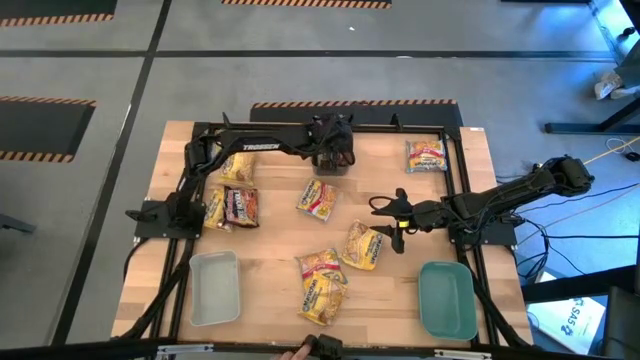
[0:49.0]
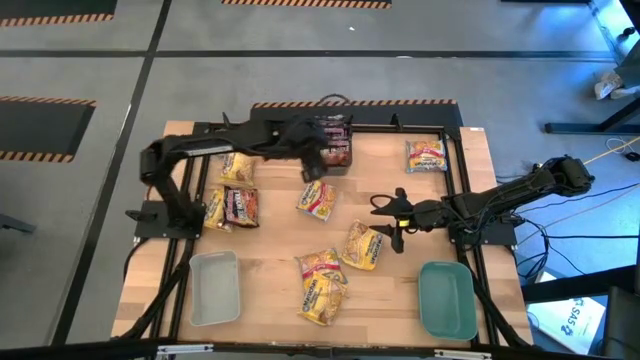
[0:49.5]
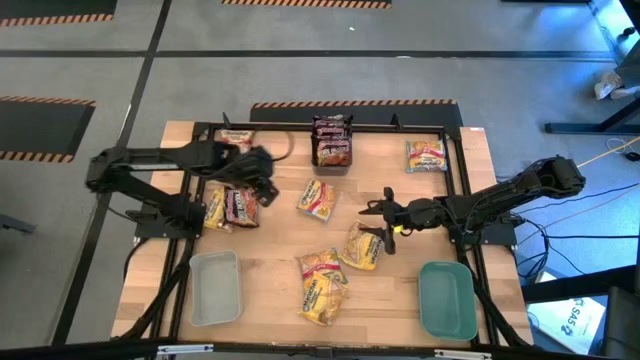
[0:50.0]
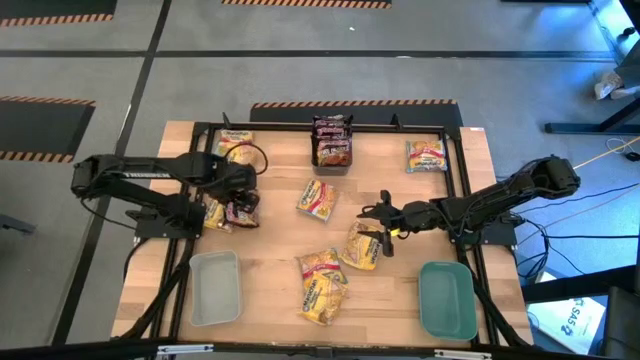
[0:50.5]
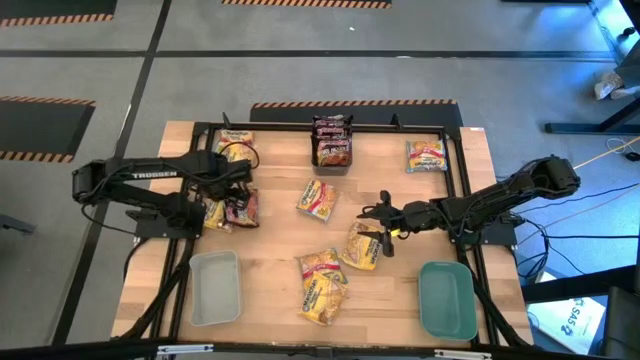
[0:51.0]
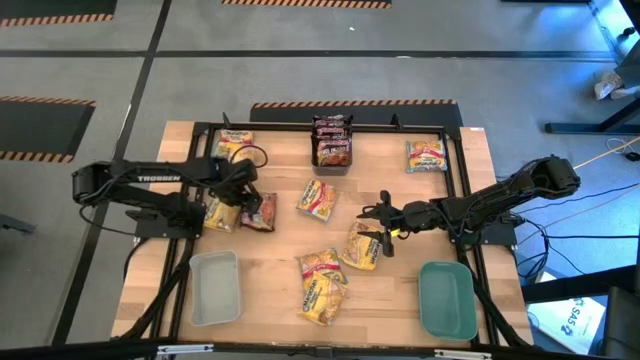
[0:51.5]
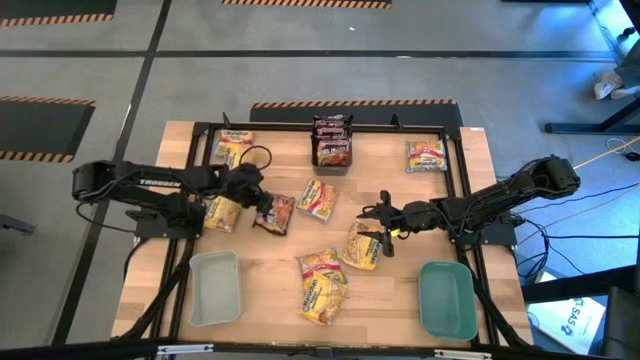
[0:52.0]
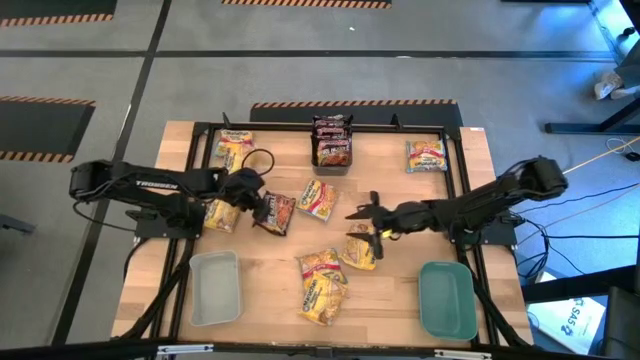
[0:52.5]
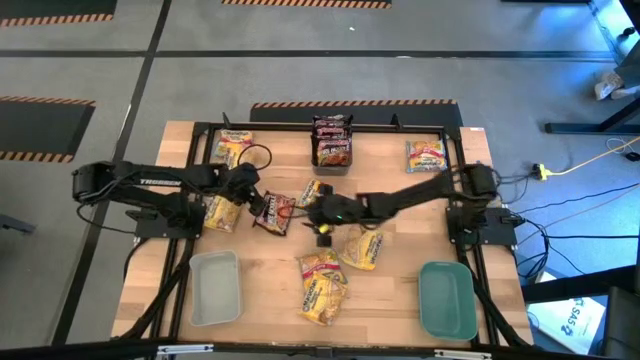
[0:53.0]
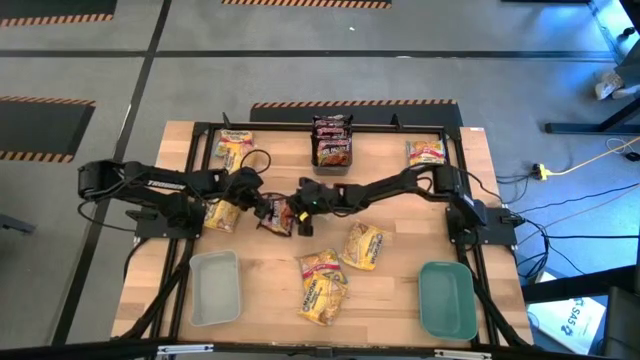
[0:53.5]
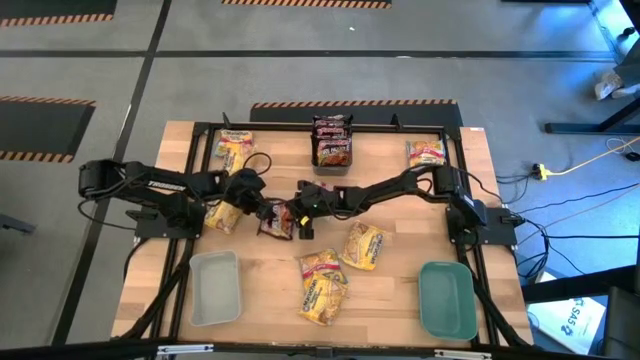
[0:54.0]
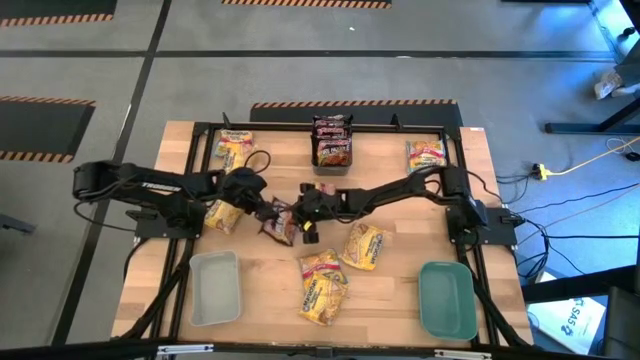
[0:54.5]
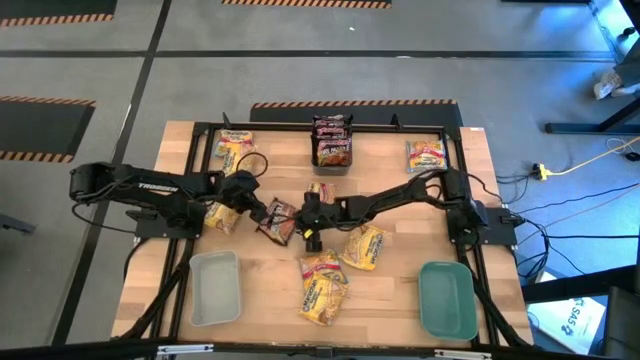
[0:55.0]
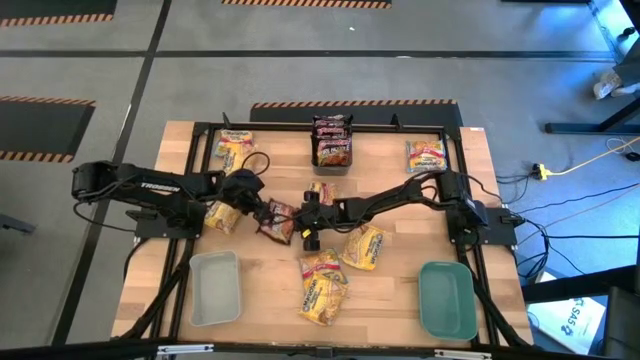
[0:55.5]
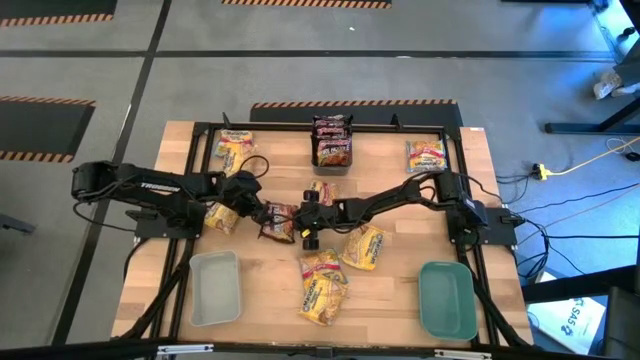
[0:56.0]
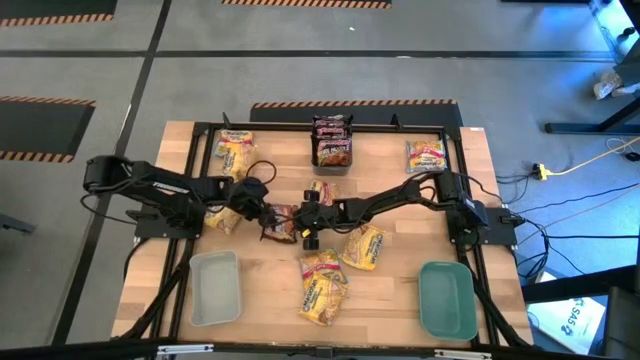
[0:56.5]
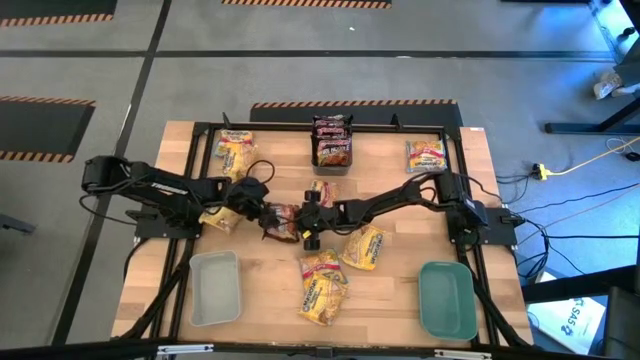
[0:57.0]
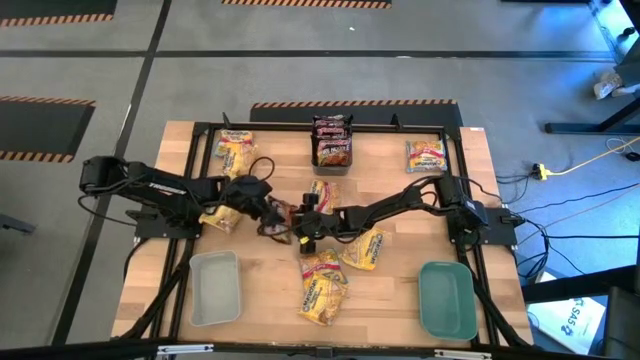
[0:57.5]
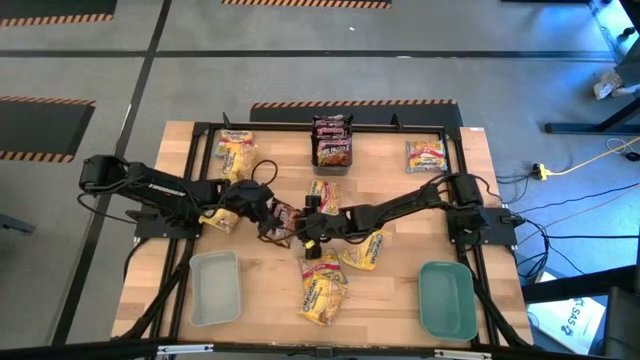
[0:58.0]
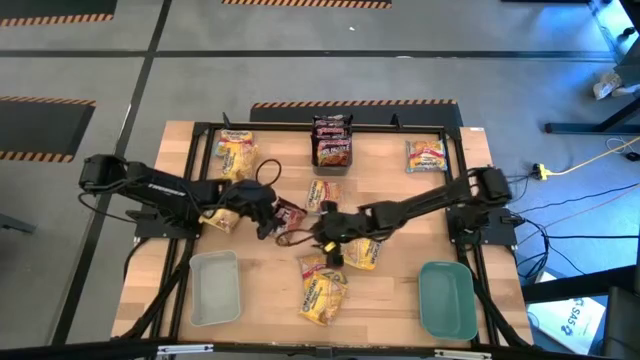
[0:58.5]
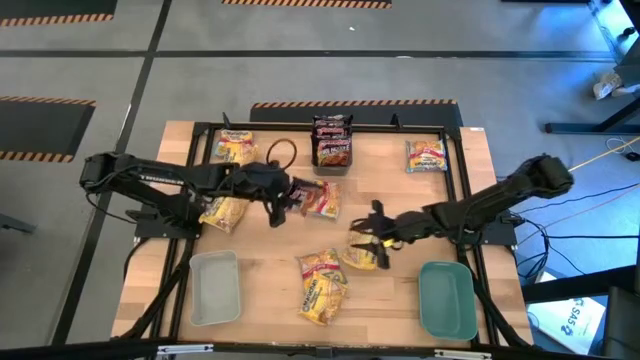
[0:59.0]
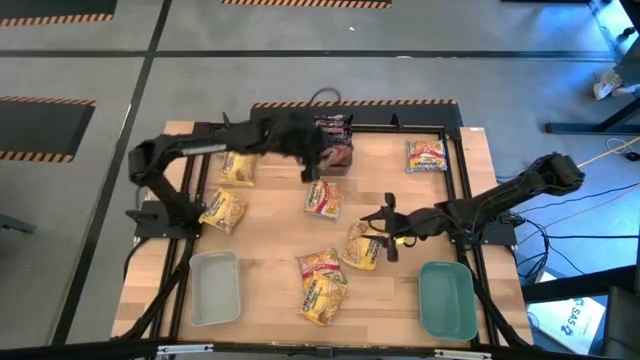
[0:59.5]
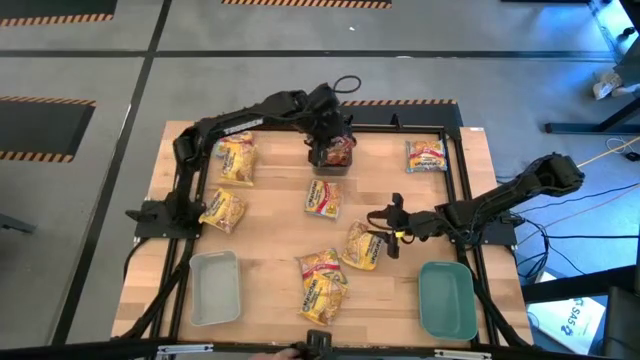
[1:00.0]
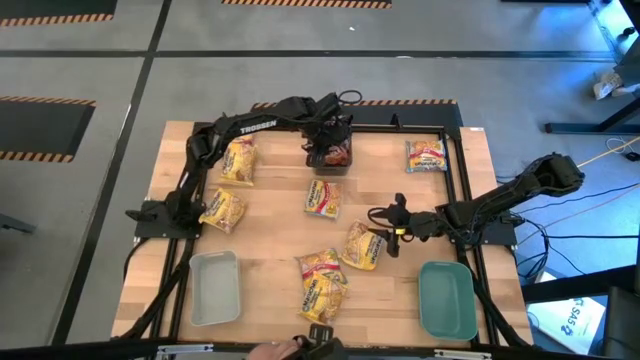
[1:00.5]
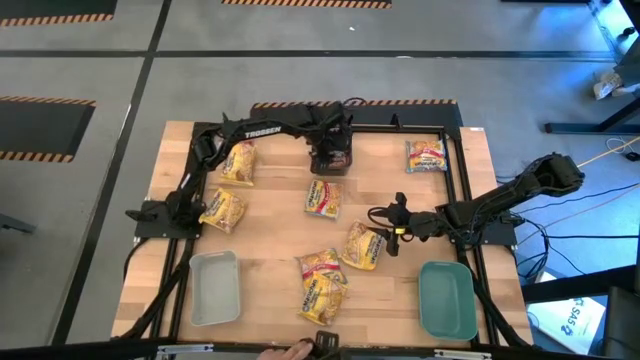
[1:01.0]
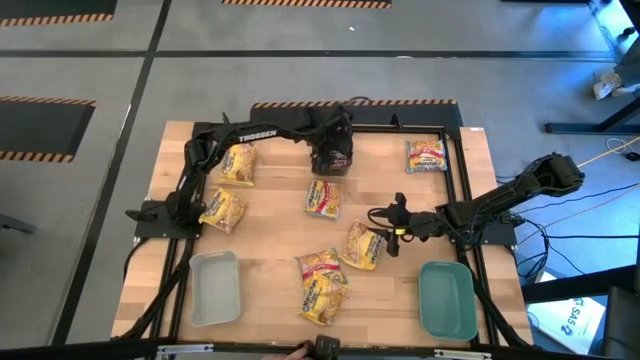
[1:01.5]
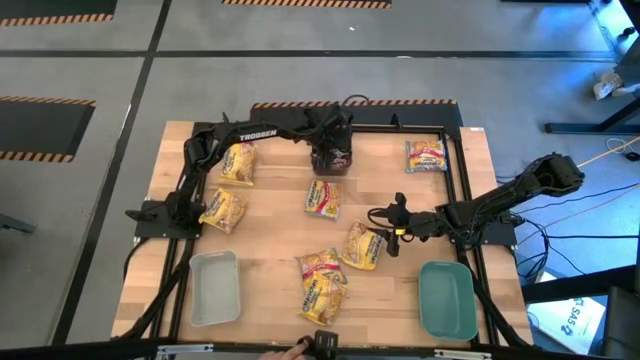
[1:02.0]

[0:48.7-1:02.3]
Task: Sort Maruchan noodles
Put the black noodle pack into the black bin

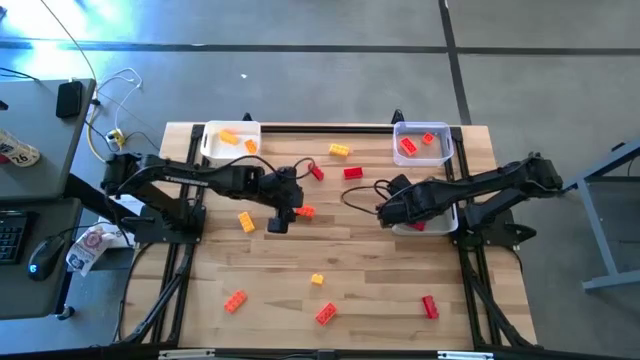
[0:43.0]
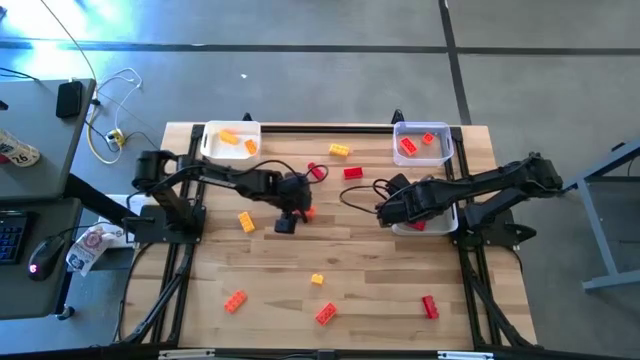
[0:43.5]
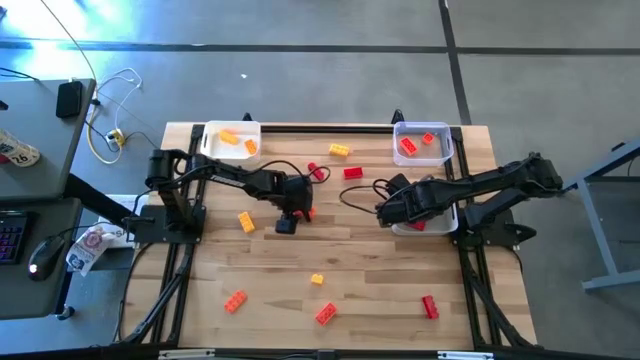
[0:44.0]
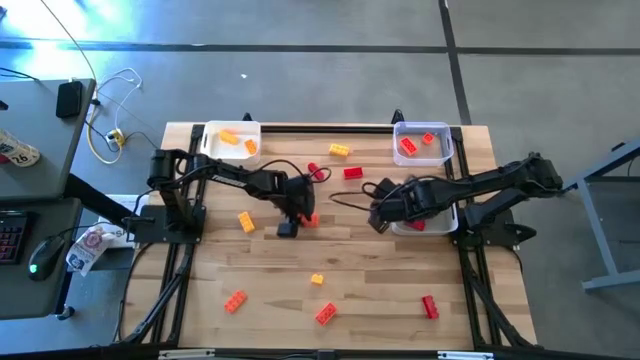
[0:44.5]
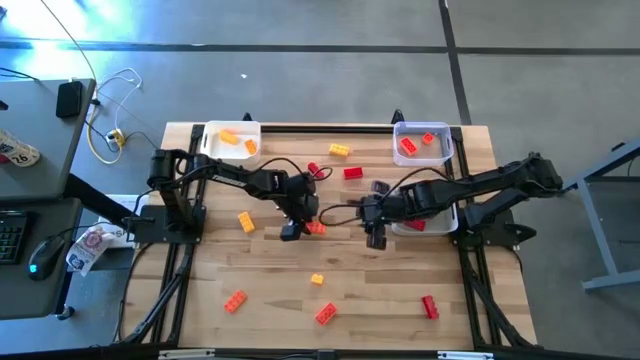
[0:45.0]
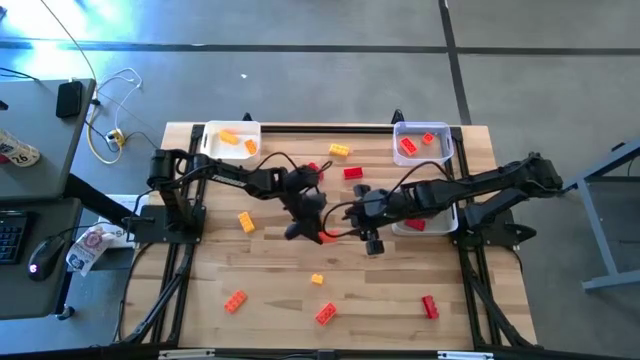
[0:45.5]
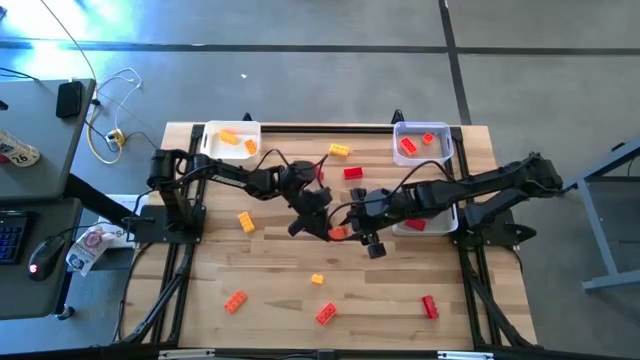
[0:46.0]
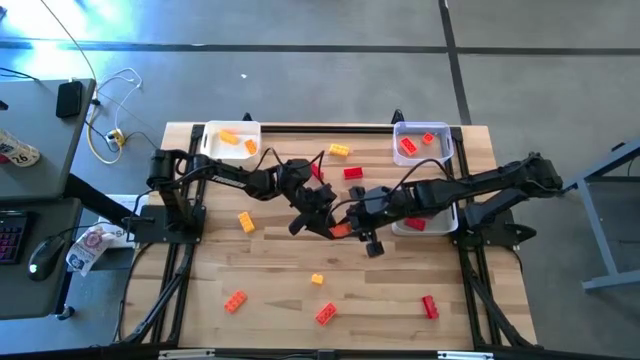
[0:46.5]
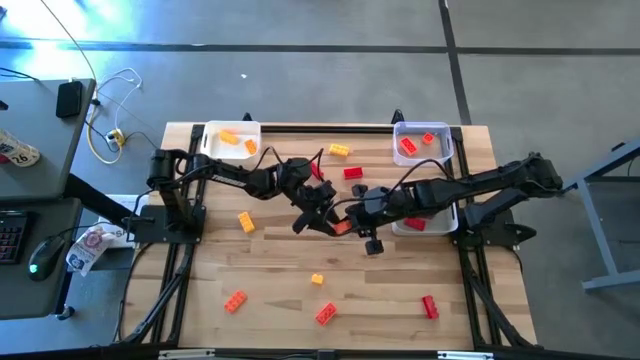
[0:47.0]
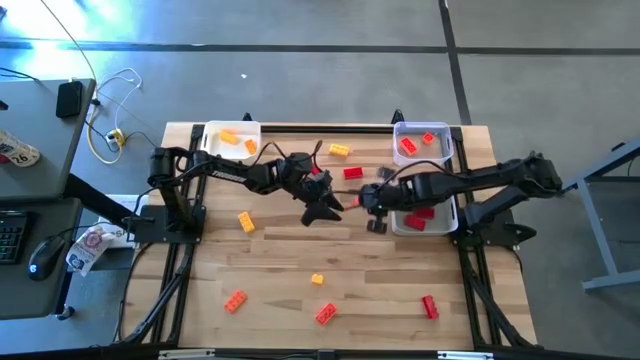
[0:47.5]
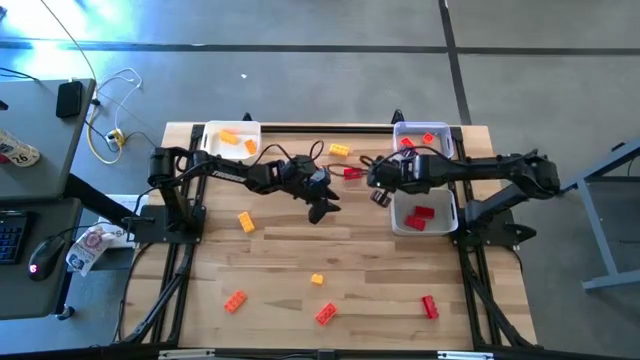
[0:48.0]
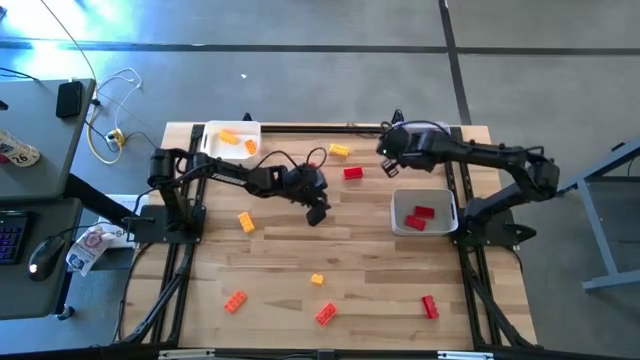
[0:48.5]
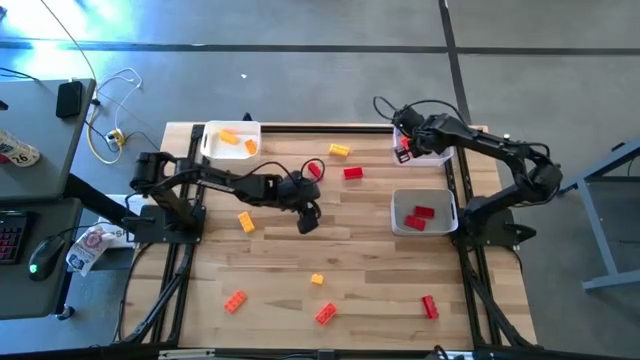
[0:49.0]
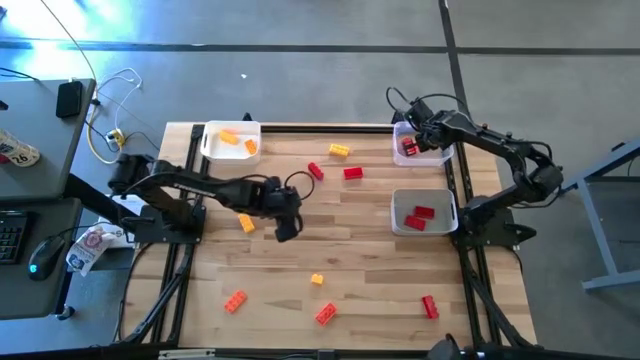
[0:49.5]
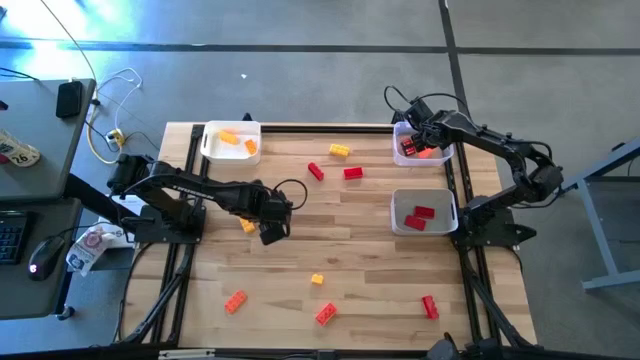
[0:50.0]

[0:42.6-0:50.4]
Task: Sort & place blocks by color
Put the orange game piece into the transparent bin
